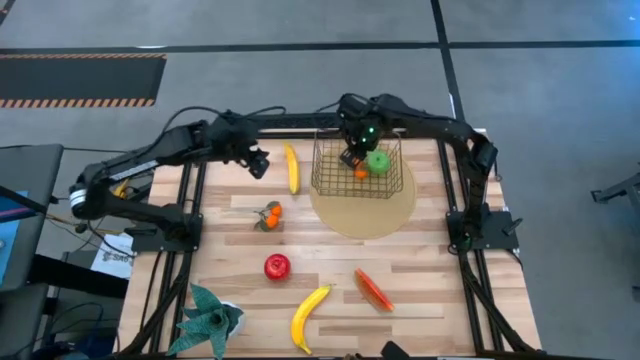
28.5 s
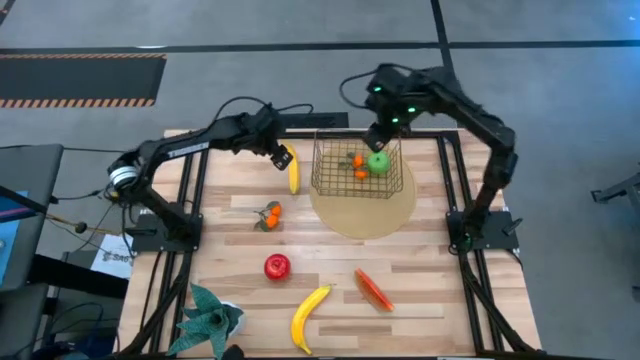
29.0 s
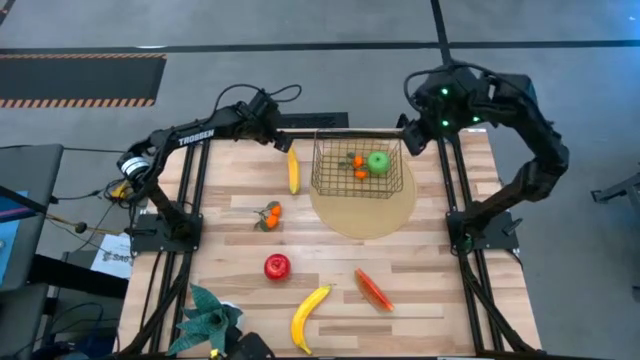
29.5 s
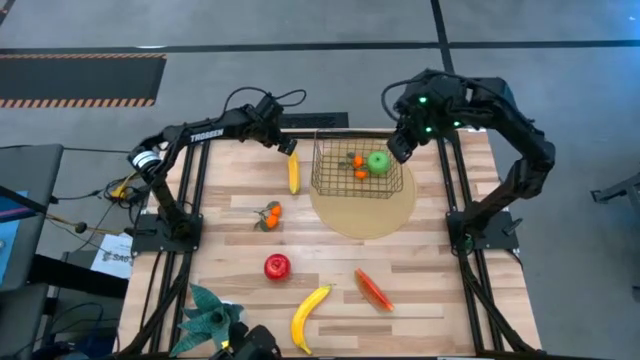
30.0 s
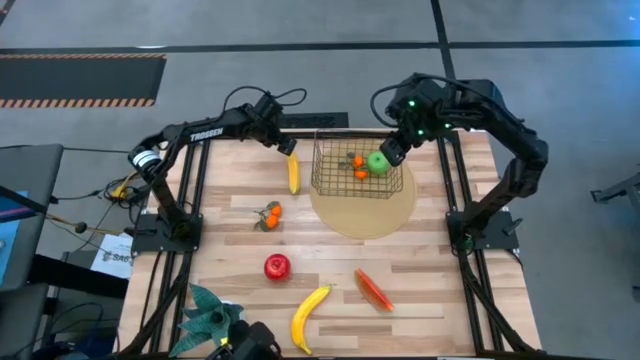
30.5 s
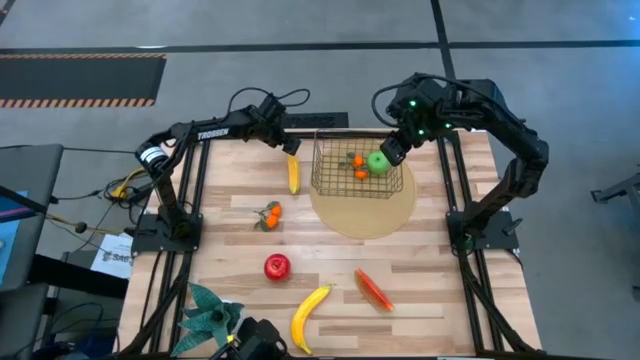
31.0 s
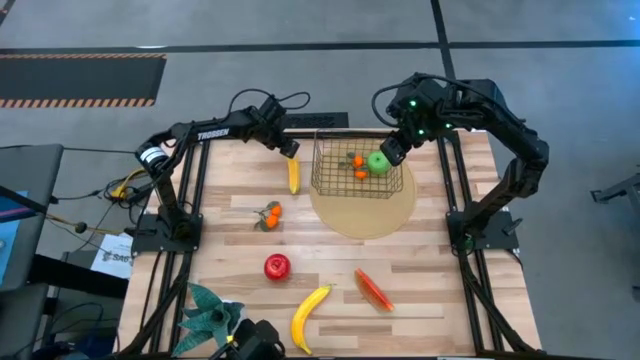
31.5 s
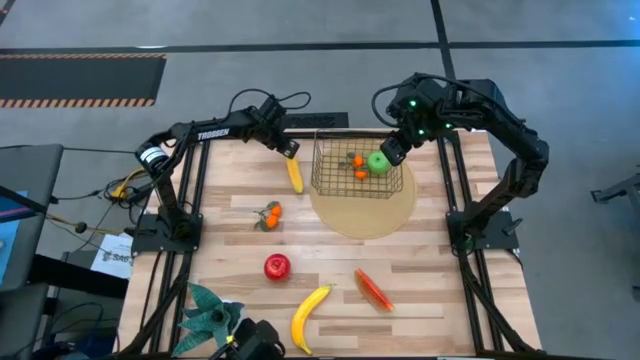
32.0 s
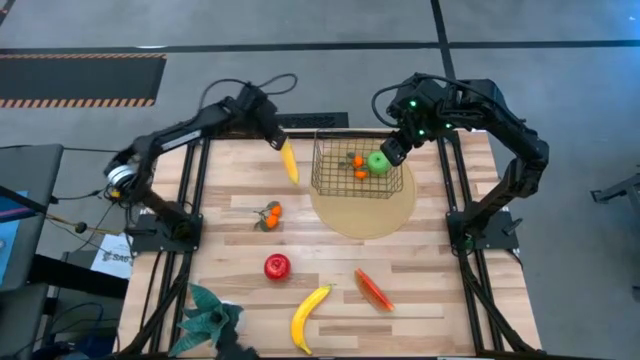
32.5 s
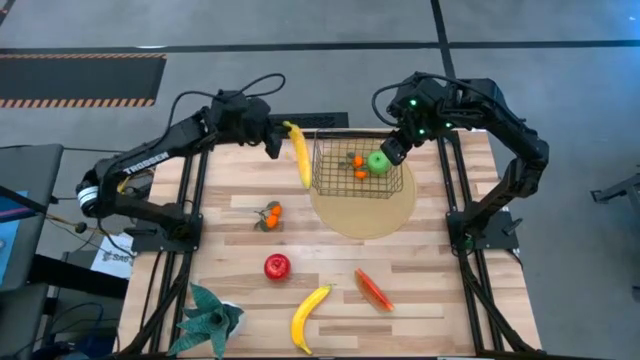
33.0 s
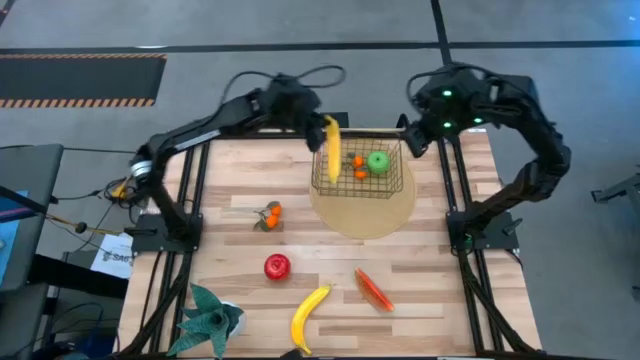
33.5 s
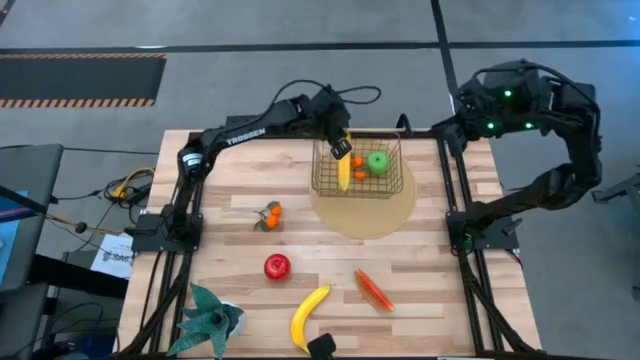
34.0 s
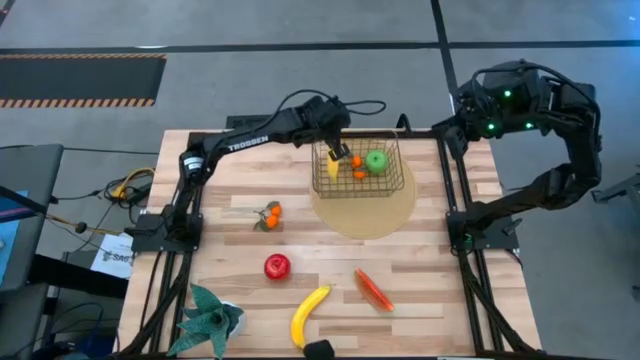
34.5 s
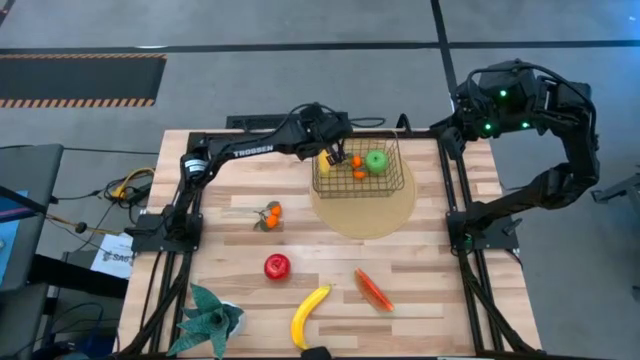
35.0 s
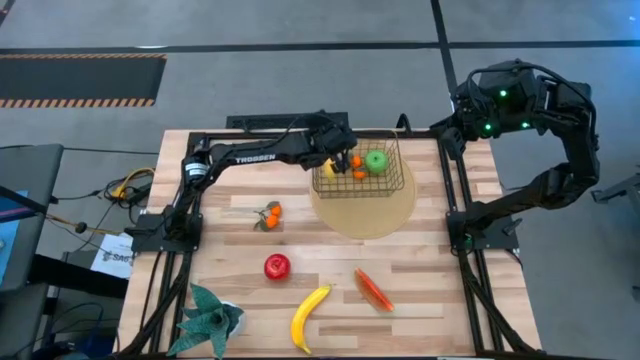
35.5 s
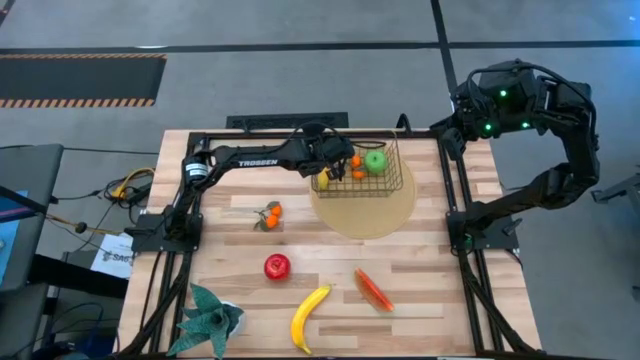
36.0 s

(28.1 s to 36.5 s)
Task: Build produce basket
Put the top yellow banana into the wire basket

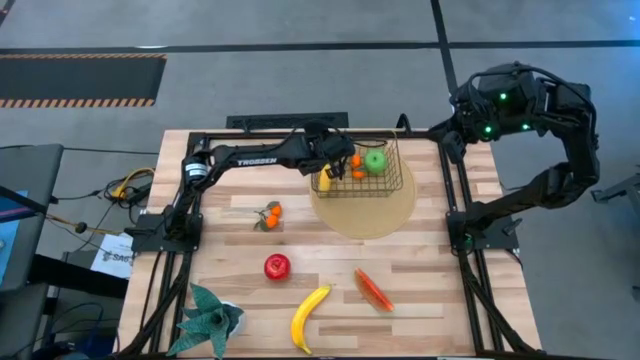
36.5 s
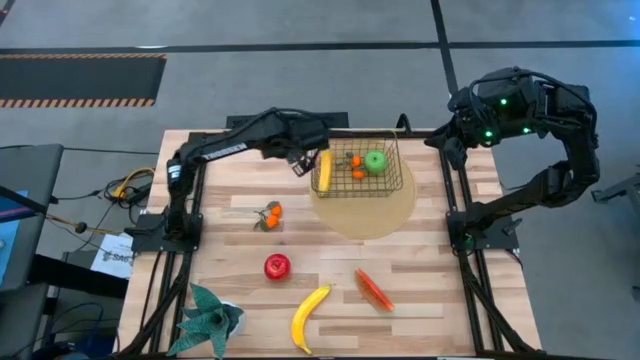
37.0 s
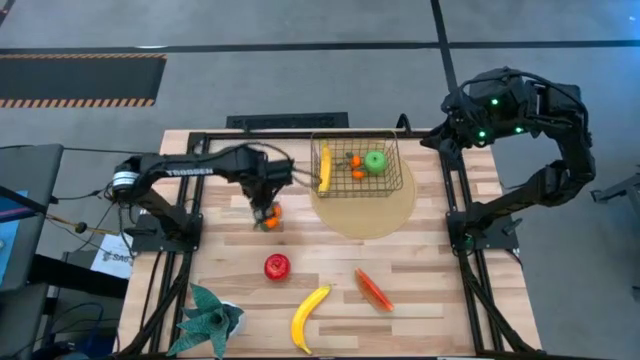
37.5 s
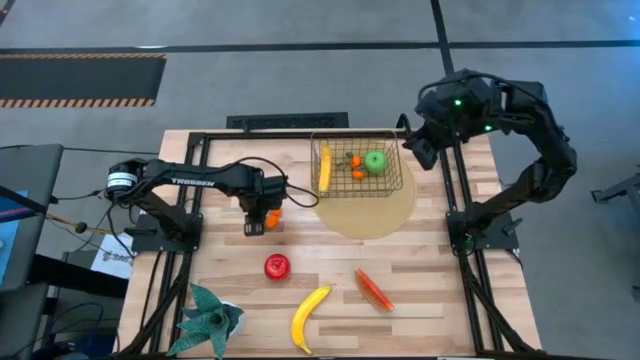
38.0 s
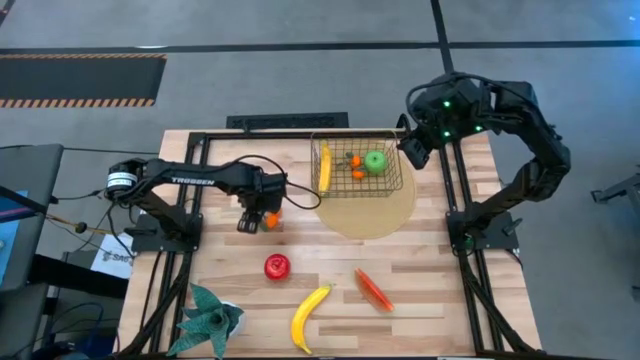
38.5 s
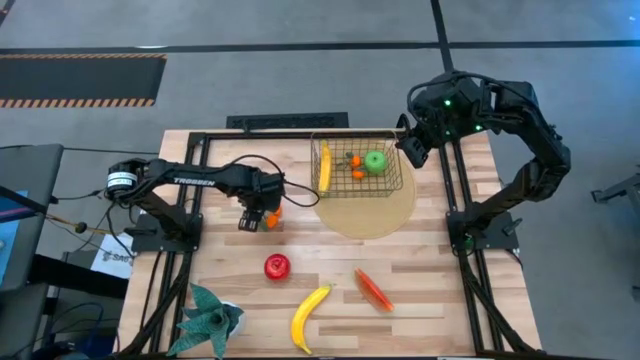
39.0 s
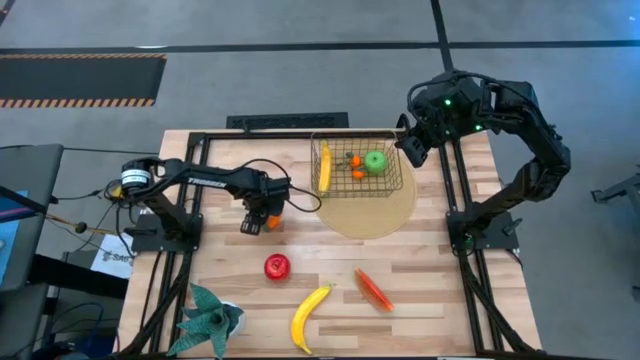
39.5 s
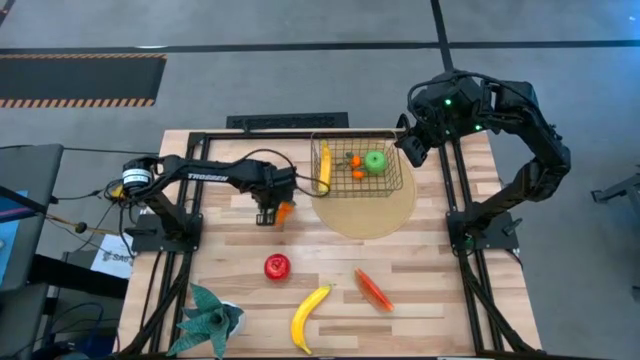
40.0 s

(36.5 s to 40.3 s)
Put the tangerines into the wire basket

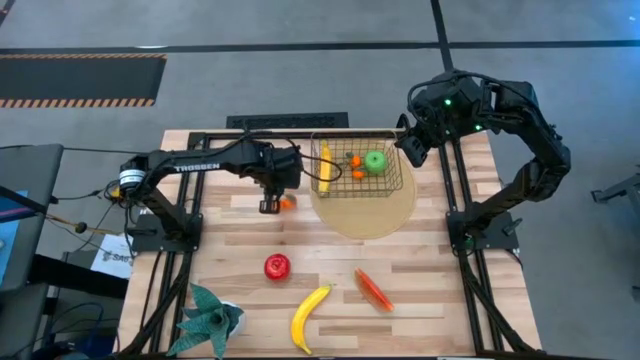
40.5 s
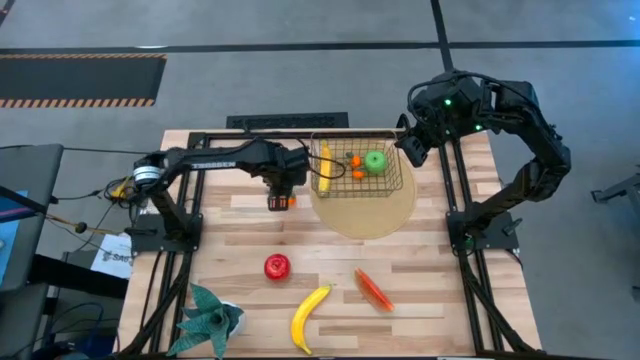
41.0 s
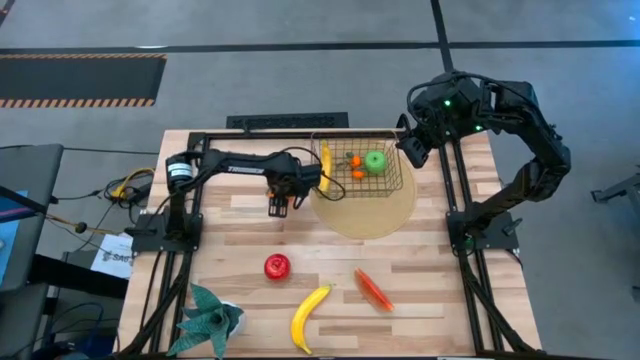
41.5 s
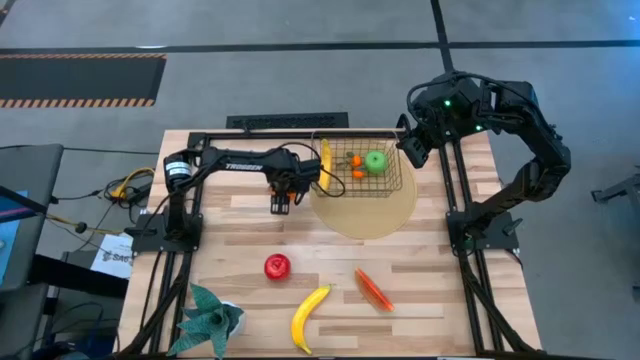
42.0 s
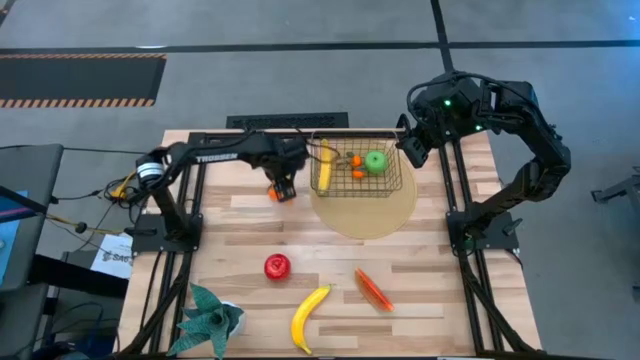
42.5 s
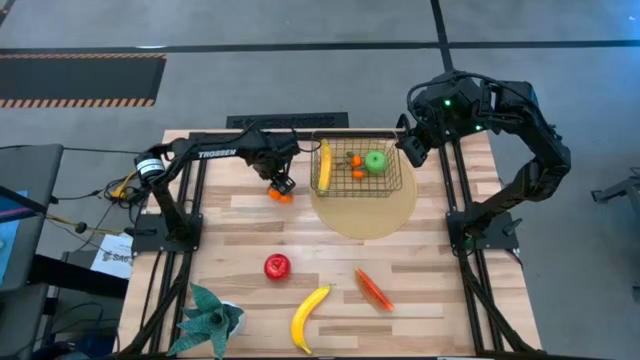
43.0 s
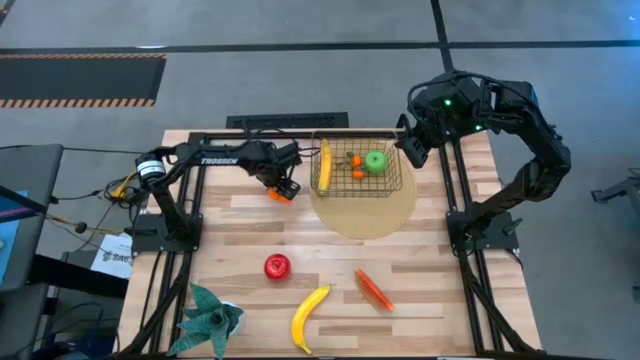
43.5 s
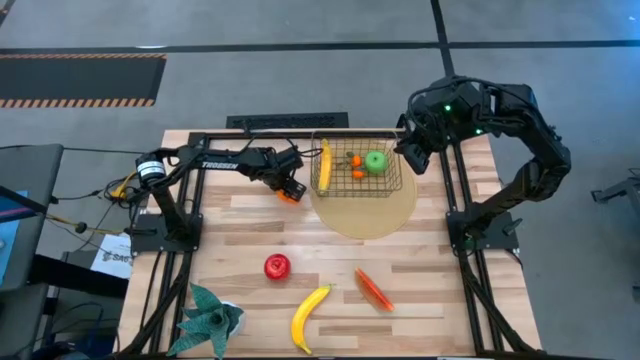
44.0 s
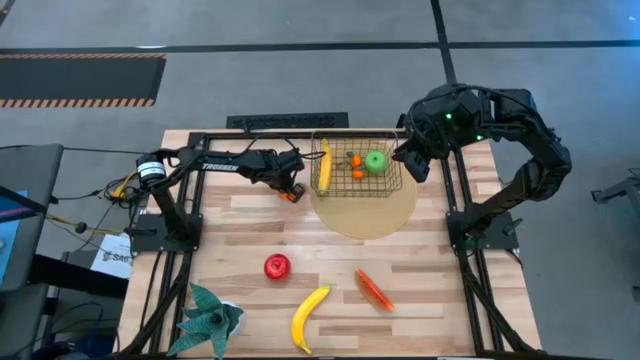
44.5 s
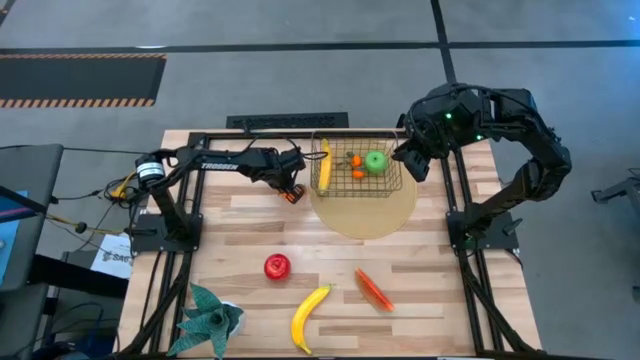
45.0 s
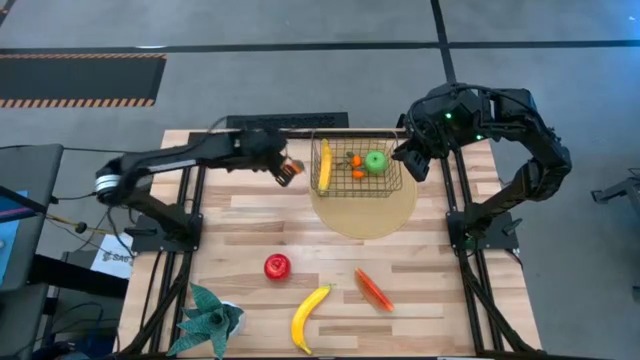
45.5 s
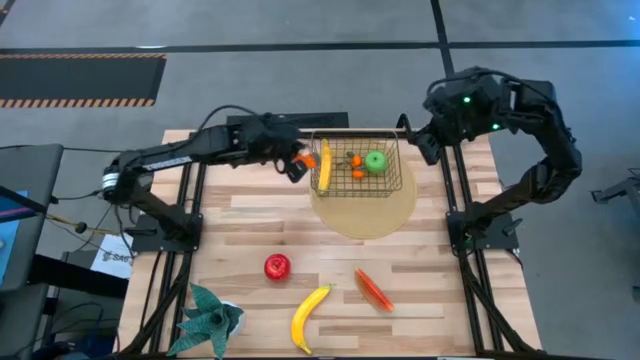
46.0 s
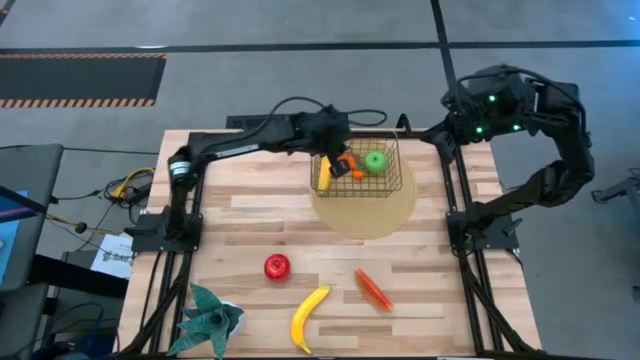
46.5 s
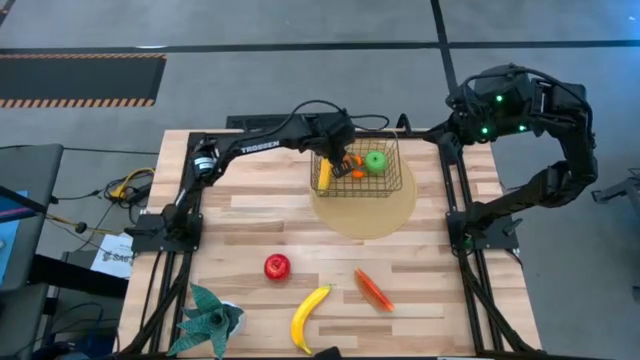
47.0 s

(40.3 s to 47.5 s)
Put the tangerines into the wire basket

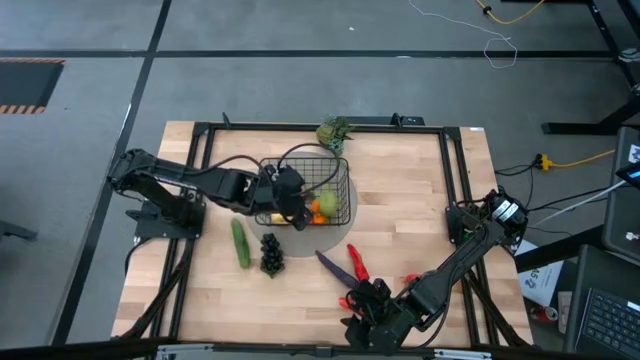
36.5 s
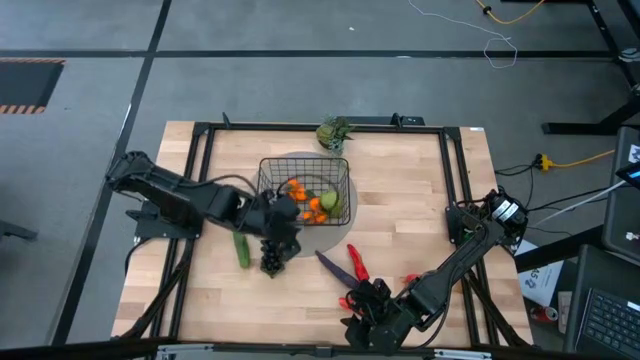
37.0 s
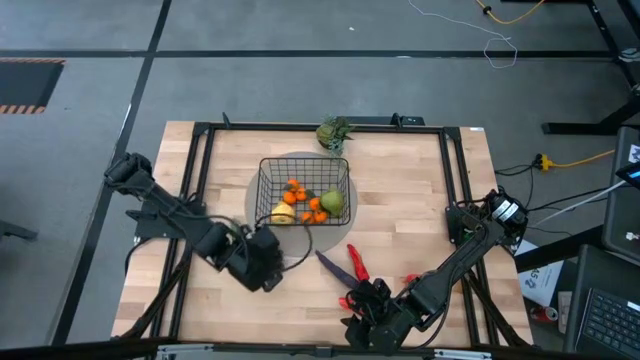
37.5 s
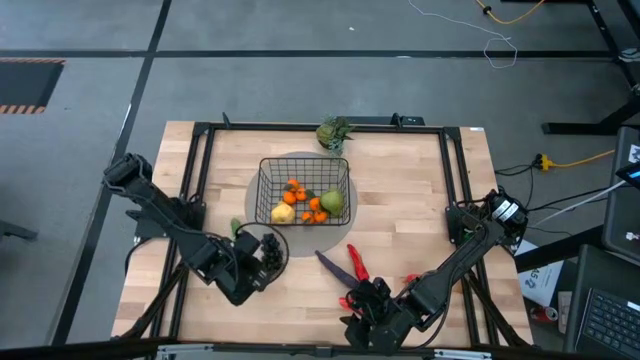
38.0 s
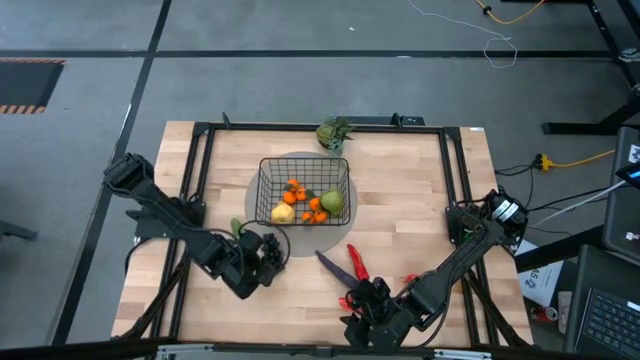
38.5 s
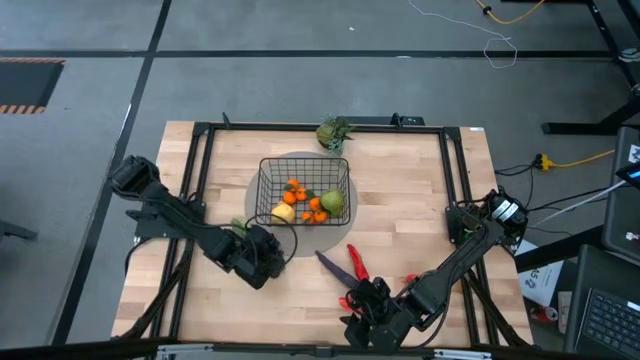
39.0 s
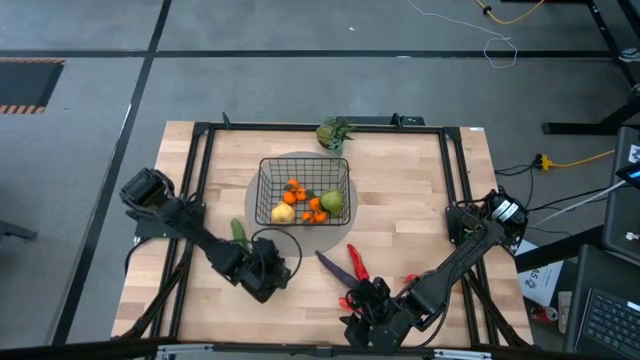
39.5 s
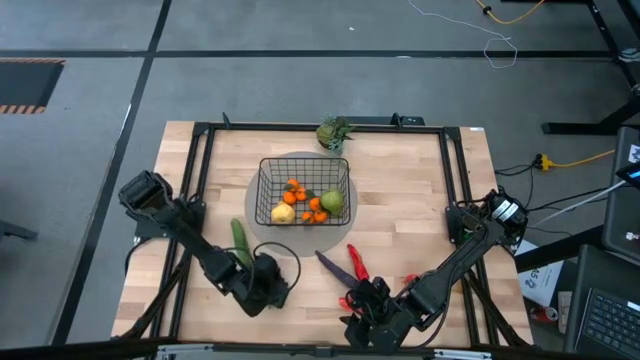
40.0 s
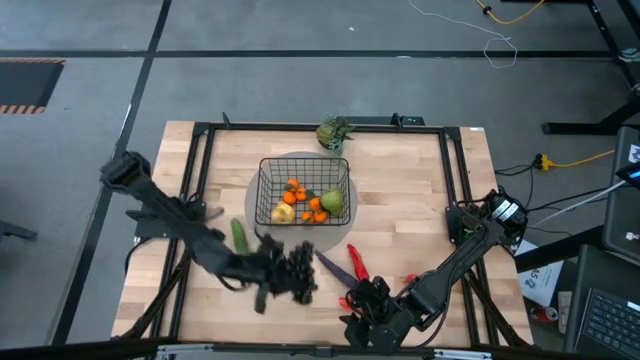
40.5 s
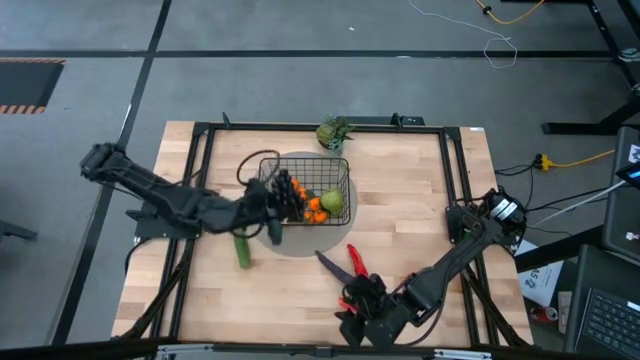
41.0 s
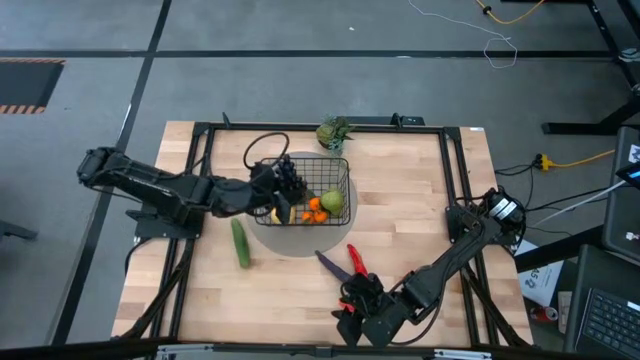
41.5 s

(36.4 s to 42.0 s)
Task: Build produce basket
Put the purple grapes into the black wire basket
